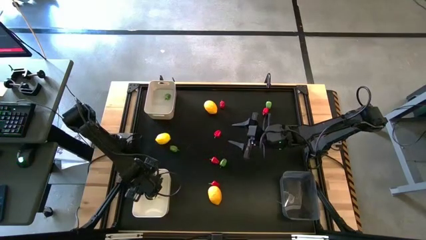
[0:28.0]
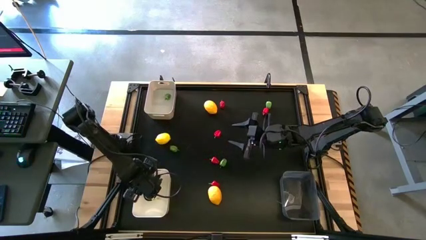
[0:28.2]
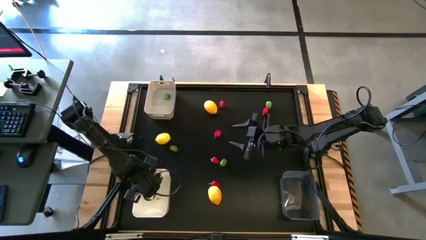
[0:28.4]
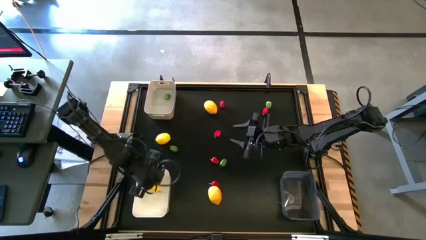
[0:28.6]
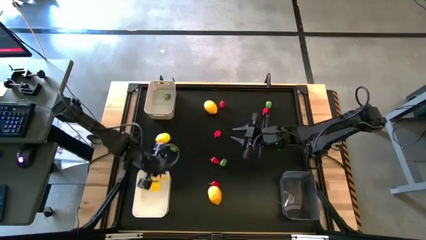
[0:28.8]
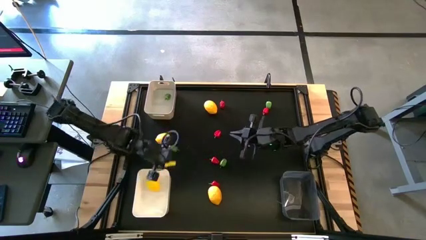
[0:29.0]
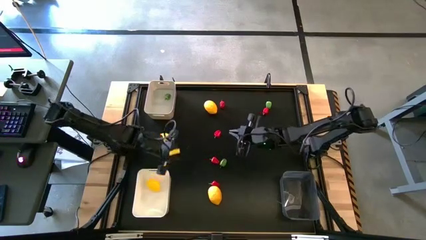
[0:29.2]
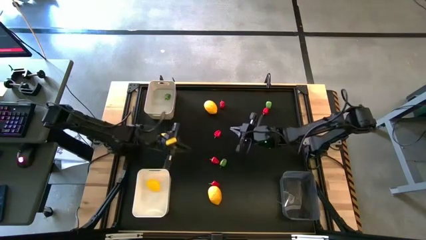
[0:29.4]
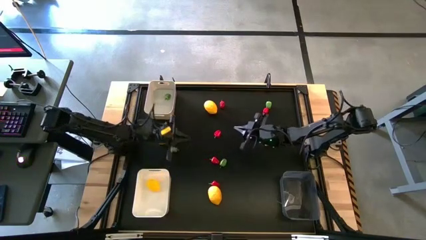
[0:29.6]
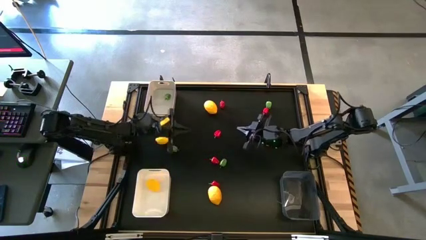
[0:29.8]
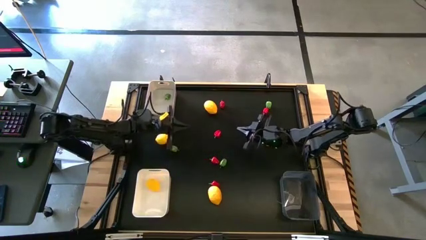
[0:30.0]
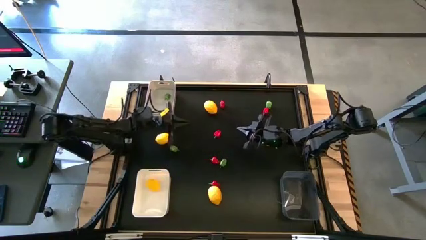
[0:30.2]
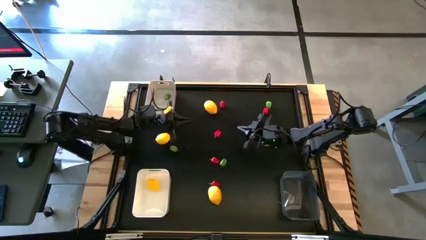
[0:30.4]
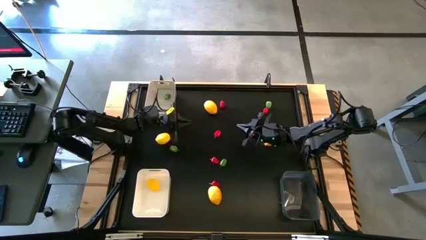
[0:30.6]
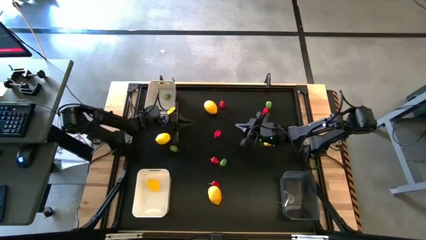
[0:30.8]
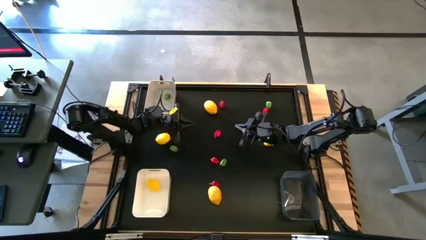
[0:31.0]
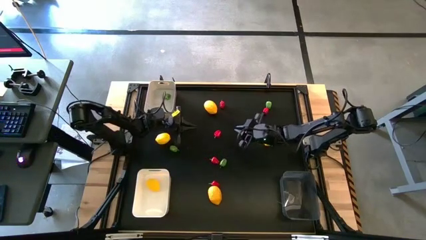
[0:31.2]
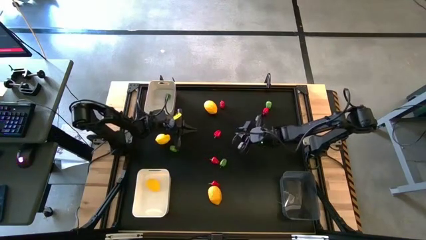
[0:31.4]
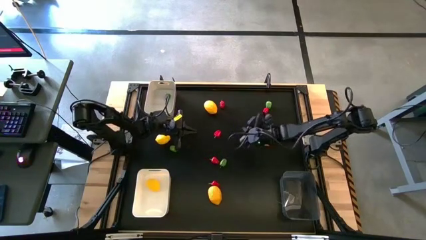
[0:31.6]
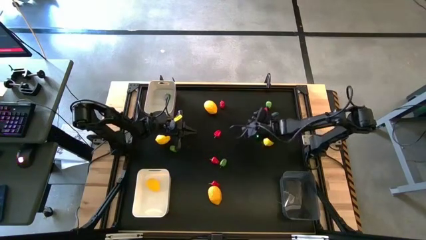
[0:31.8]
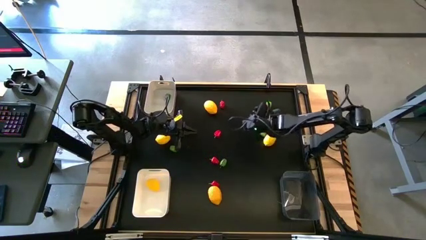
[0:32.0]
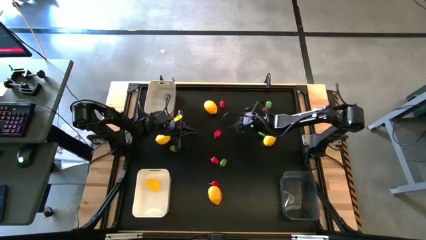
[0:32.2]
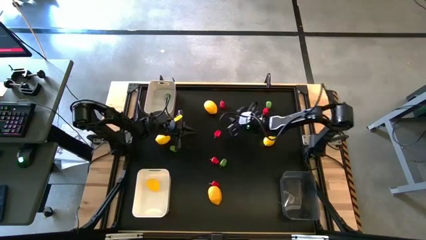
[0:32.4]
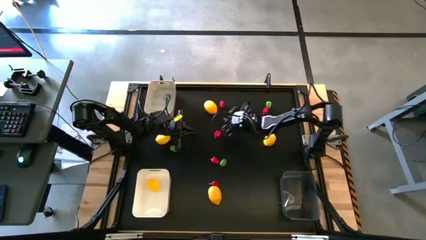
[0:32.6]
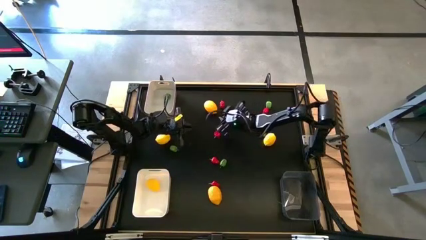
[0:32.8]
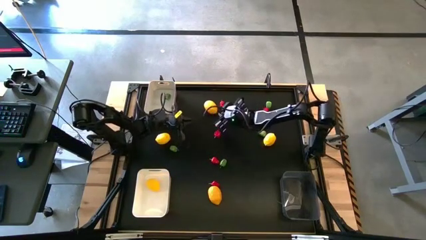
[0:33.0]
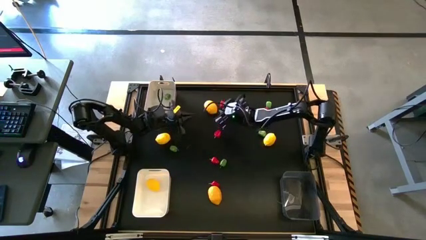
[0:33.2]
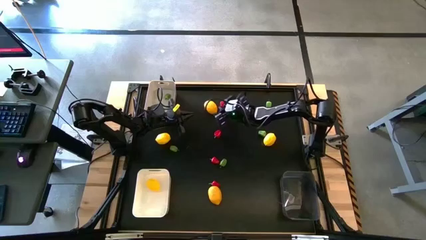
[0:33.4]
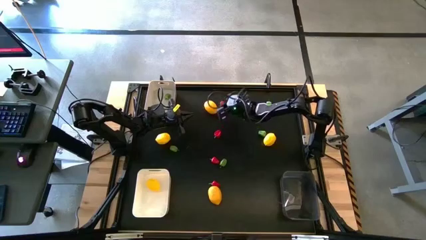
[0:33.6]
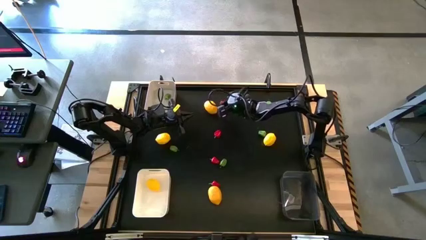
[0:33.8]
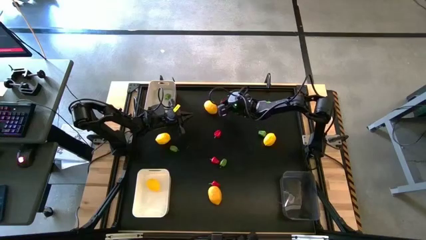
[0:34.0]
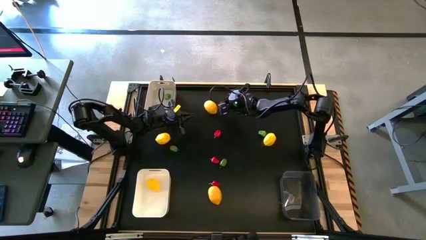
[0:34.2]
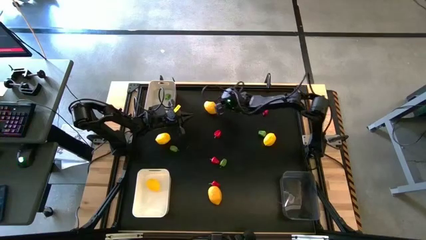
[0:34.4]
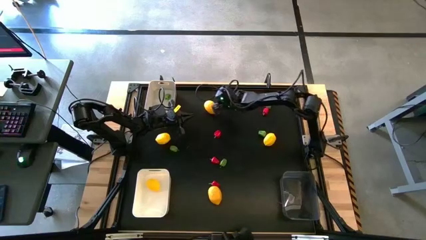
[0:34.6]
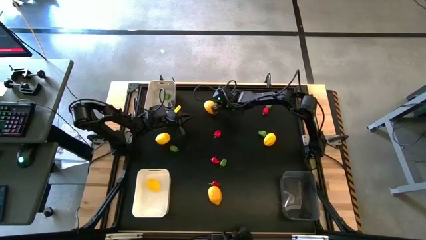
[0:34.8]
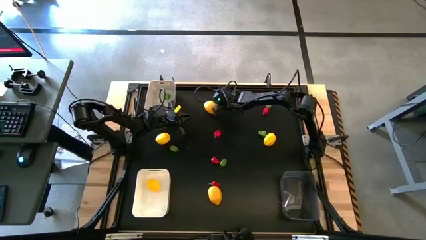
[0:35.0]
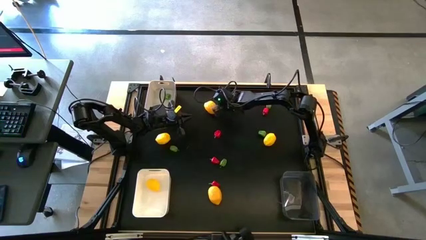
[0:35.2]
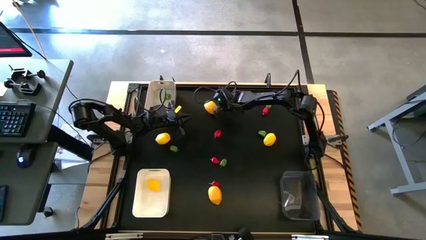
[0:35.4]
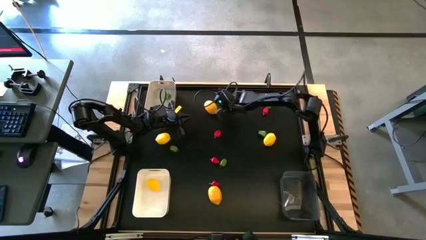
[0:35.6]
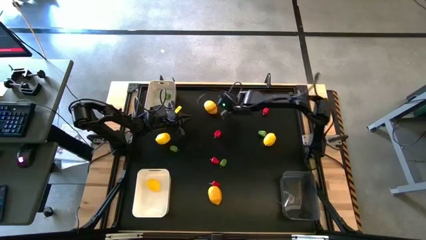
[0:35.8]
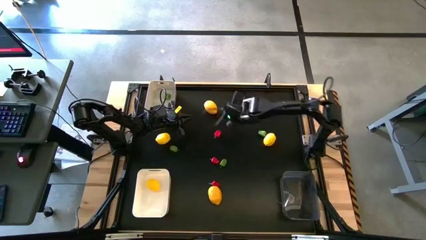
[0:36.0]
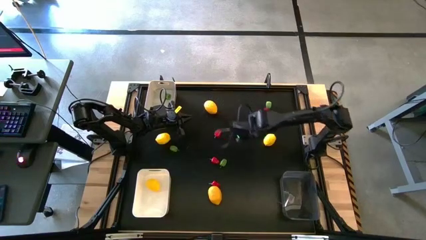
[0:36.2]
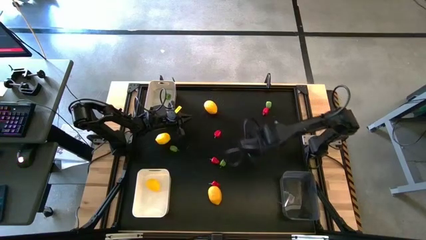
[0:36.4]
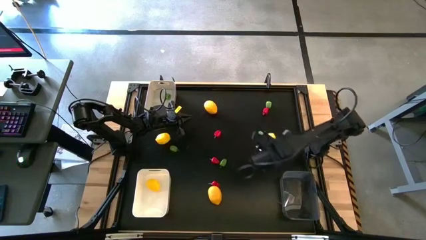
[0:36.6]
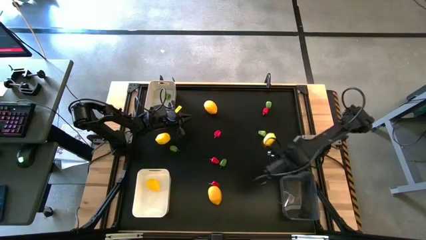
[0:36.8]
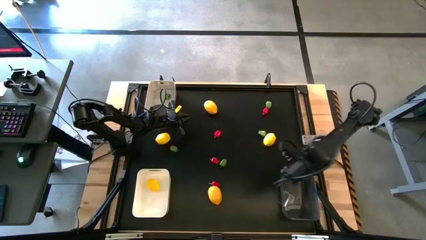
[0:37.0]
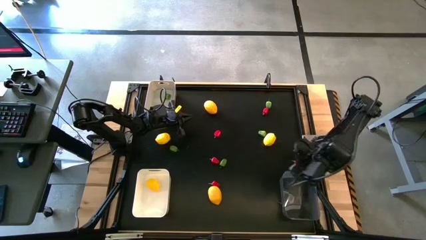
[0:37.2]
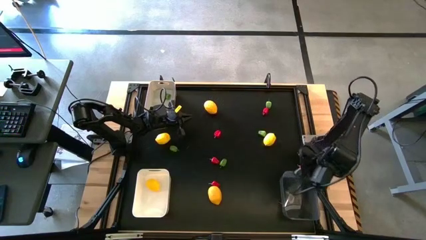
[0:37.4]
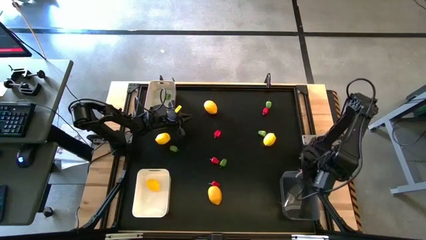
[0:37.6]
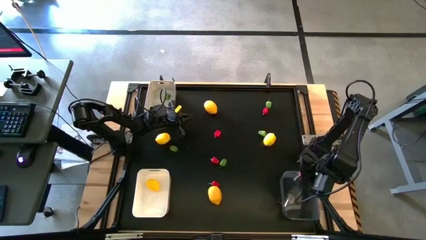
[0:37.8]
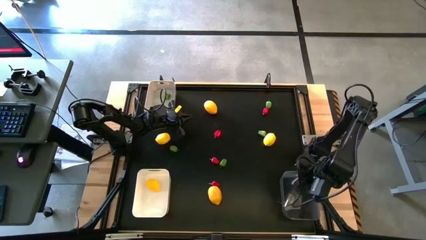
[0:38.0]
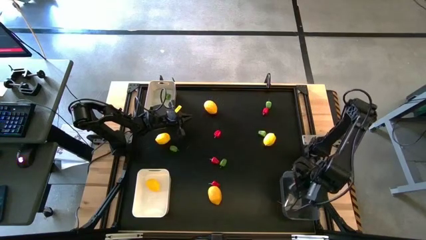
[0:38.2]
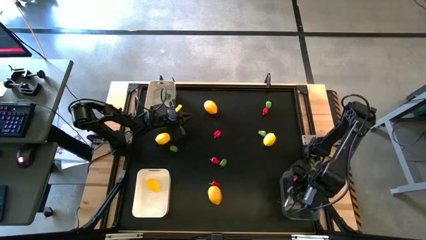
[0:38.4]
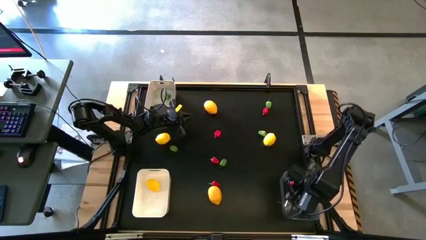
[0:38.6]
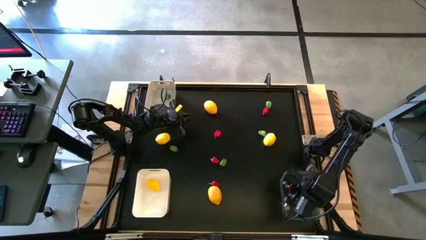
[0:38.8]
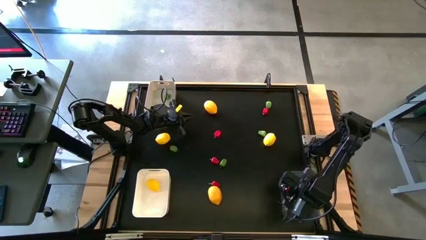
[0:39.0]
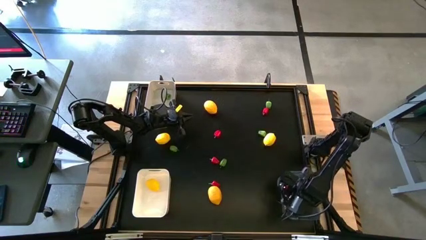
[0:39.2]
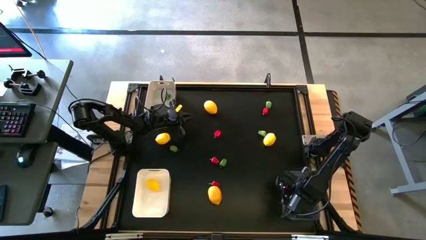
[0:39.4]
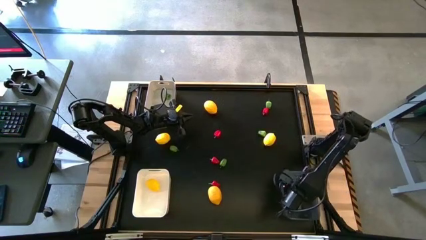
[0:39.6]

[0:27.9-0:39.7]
Task: Sort produce into baskets
Put the red chili pepper into the black transparent bin

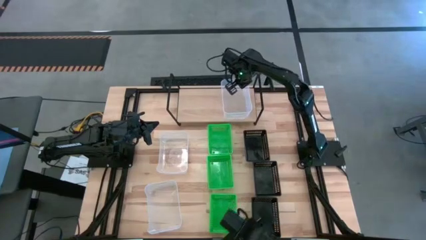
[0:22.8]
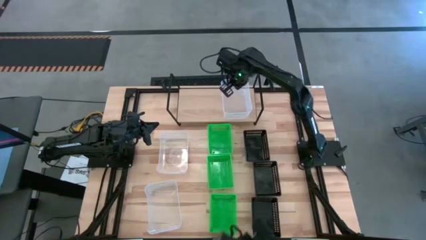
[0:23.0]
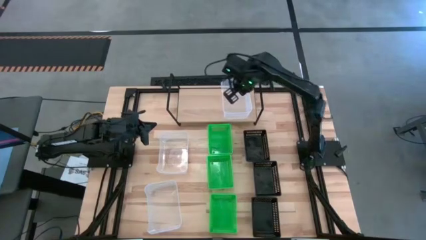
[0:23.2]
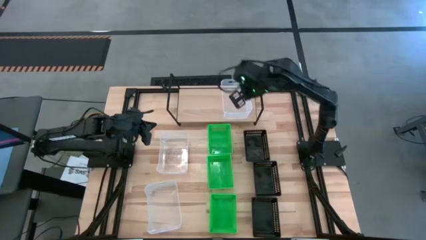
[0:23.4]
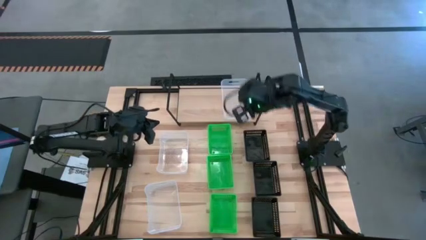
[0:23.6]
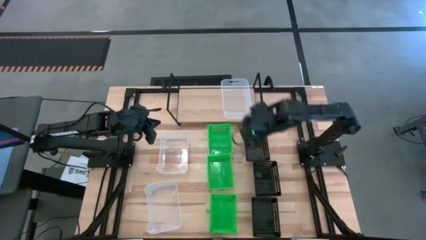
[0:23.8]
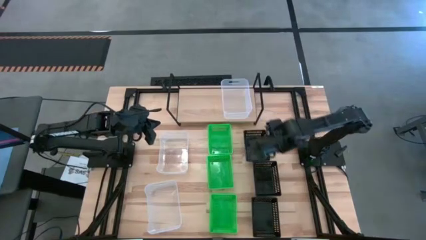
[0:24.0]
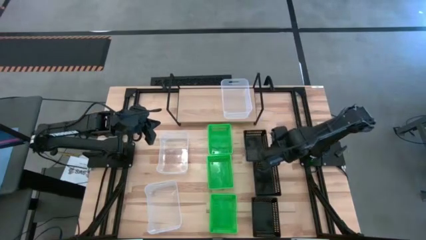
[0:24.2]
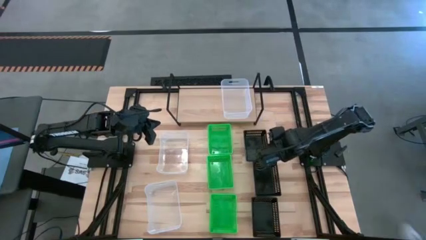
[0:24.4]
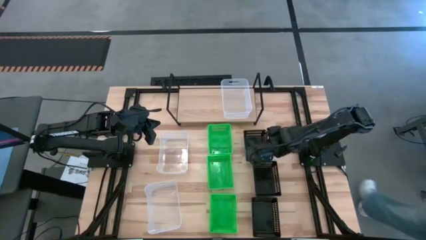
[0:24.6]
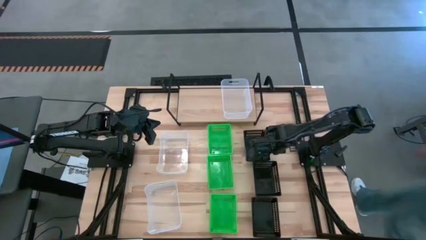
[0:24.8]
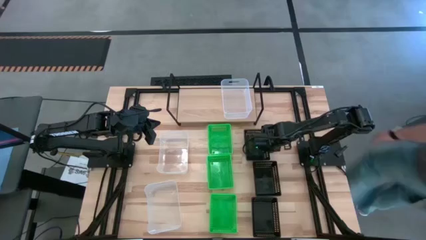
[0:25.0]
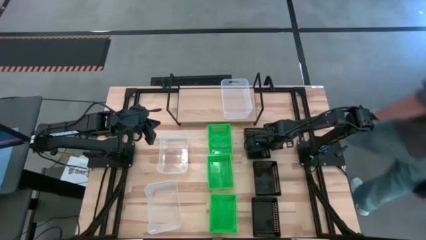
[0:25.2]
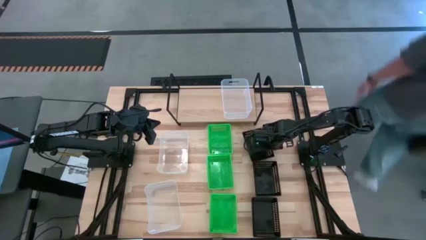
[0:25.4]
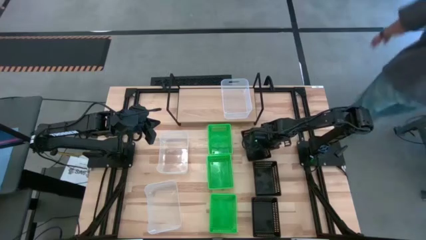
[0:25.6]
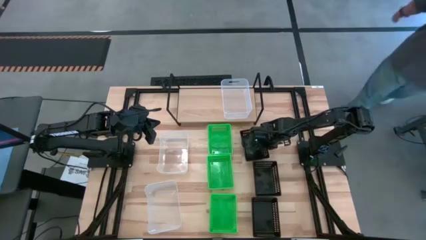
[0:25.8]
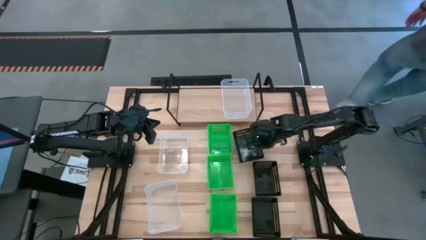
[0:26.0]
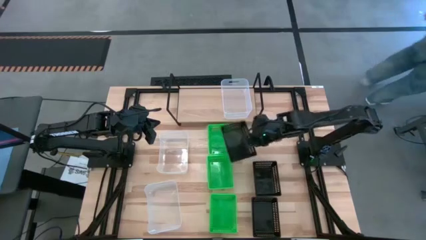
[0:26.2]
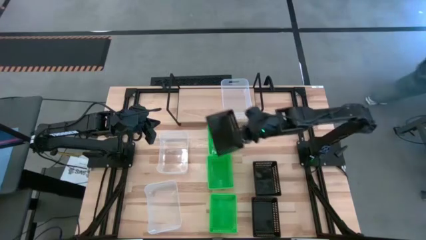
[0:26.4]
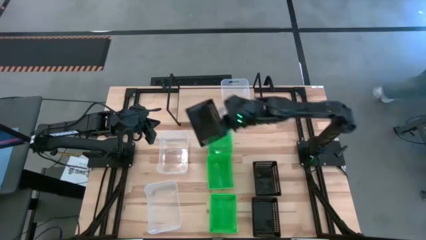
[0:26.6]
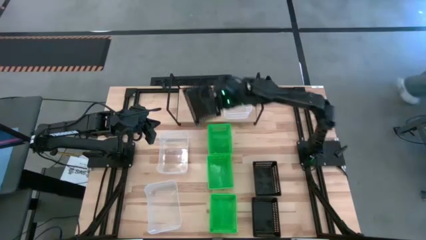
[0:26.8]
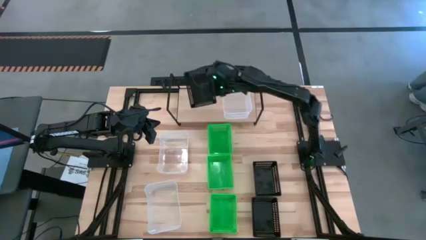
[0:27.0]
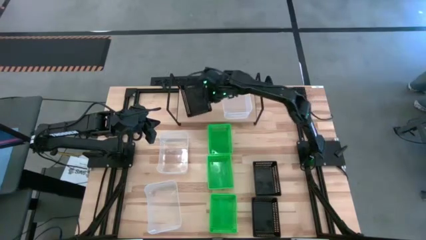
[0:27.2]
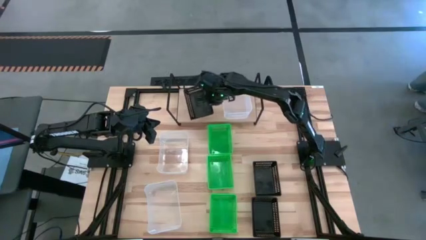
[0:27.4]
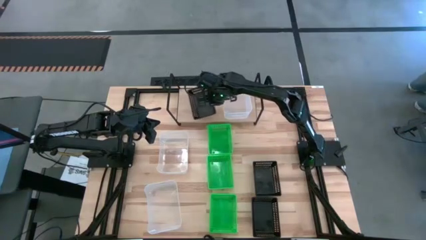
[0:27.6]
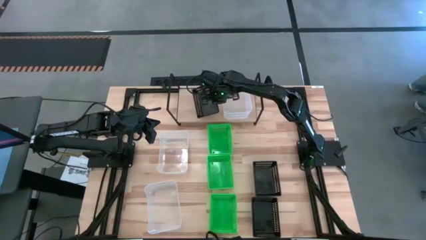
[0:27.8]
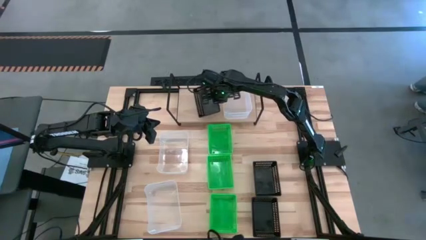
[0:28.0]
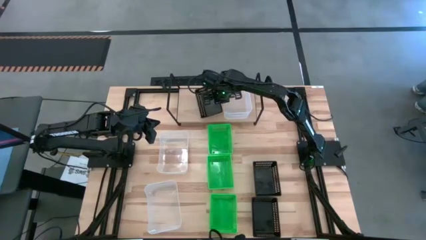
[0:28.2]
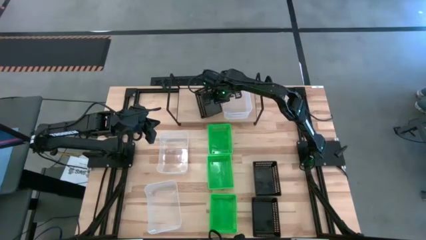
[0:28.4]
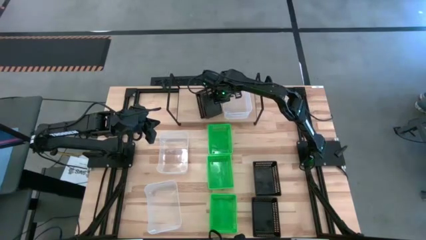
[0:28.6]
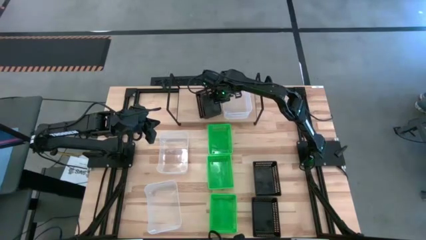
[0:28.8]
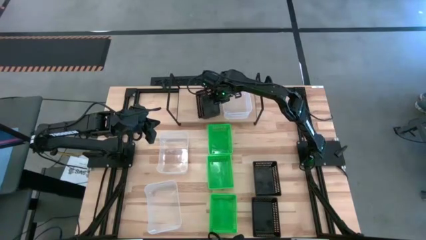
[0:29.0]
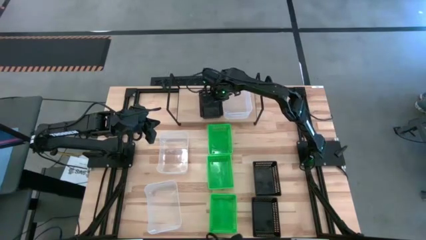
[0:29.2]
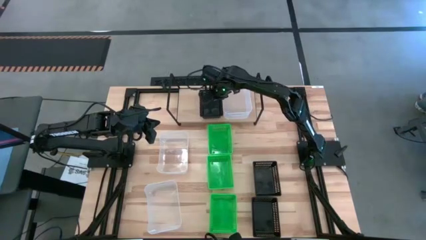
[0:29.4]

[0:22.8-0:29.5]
Task: Stack baskets on shelf by color
Put the top black bin on the shelf
